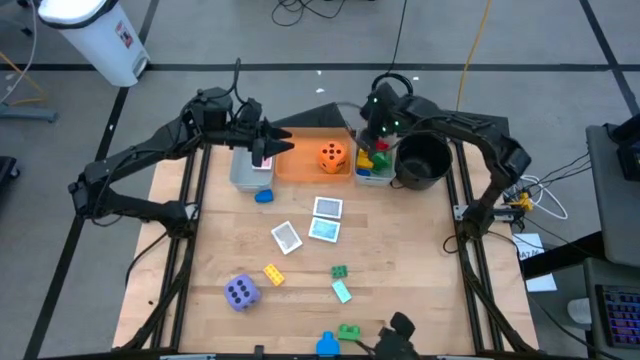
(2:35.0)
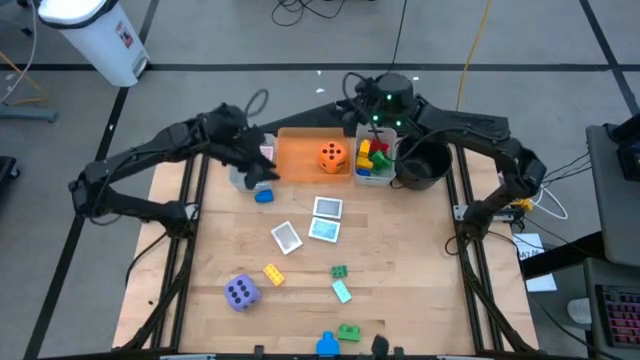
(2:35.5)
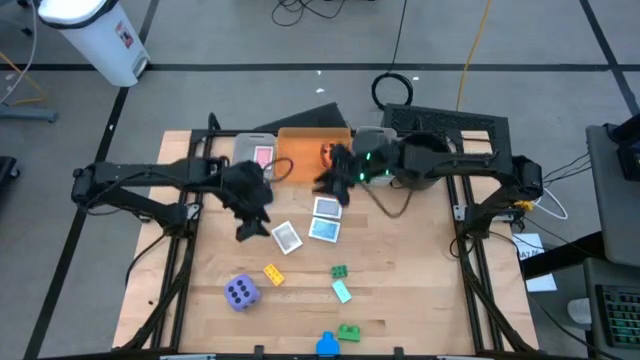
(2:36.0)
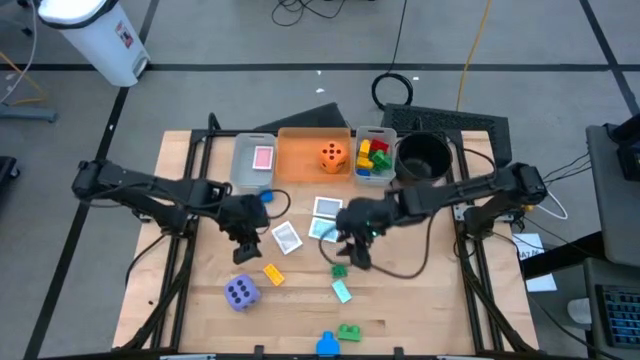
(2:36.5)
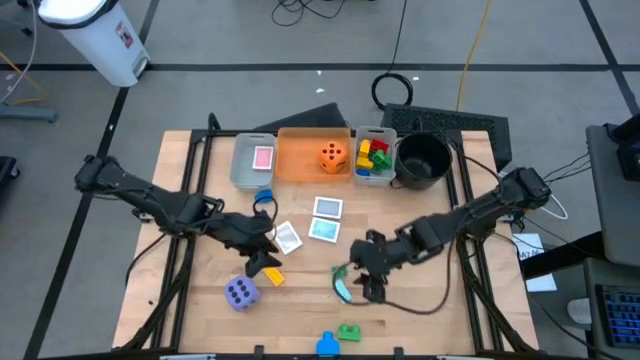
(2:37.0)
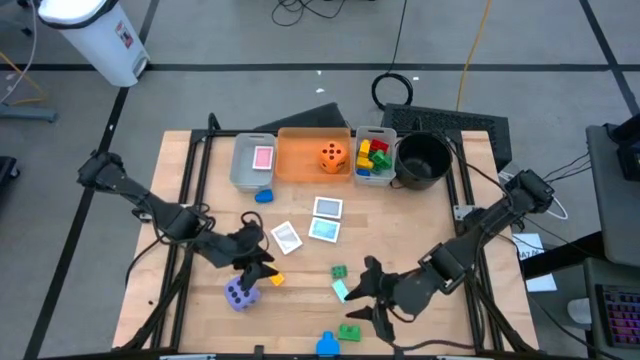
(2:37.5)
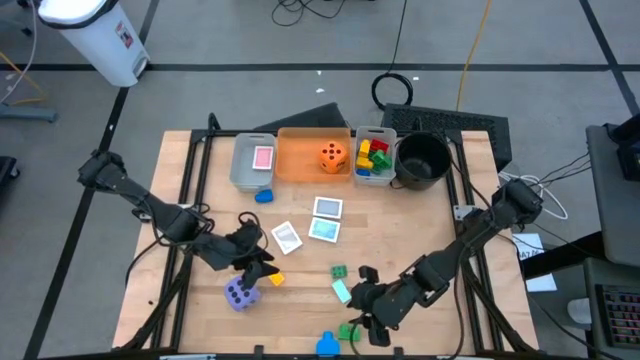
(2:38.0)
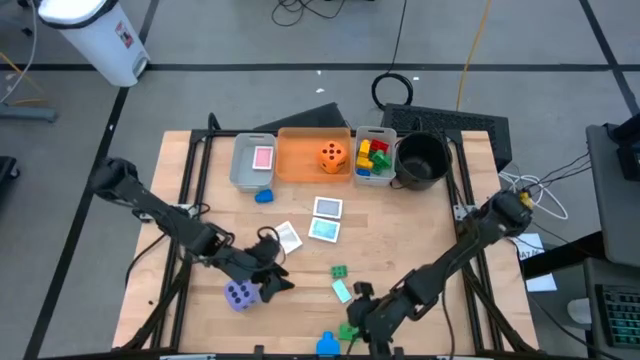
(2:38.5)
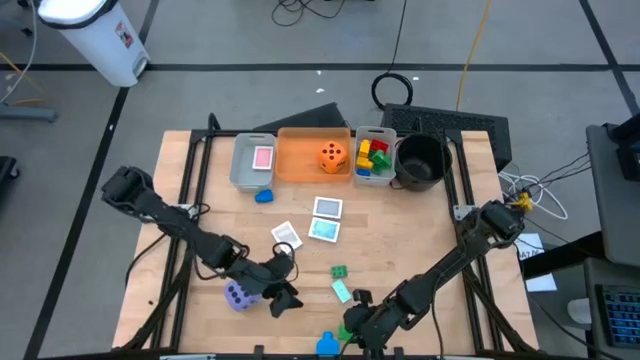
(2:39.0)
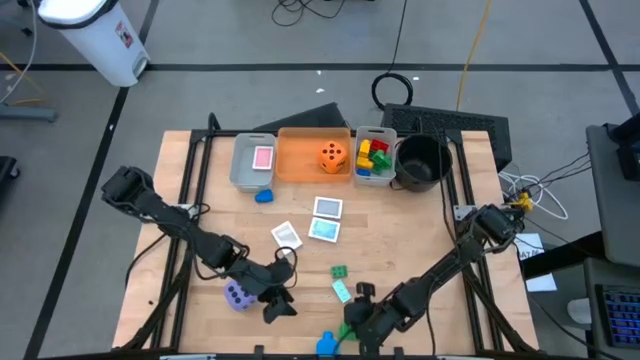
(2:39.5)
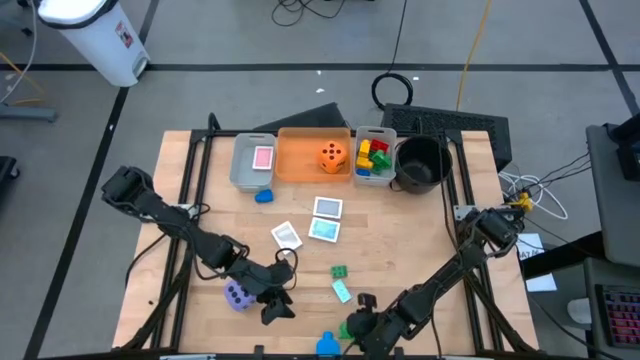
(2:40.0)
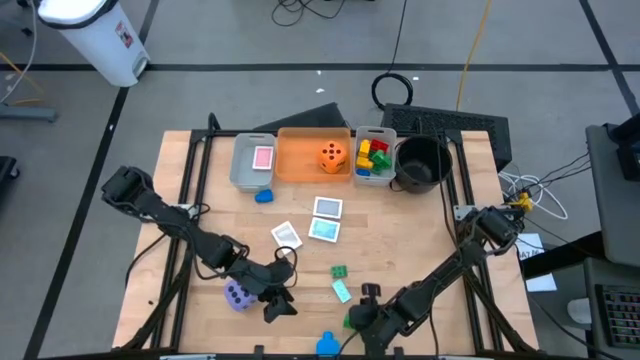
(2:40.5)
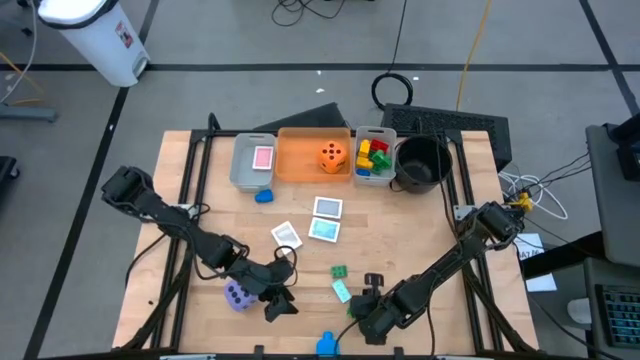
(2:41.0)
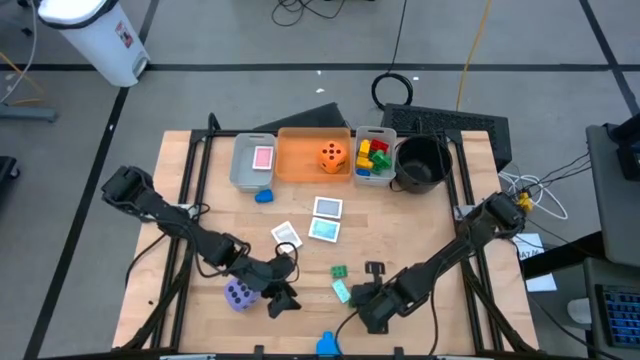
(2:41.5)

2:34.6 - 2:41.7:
Task: Pick & Place Toys
Put the green game piece into the right gray bin

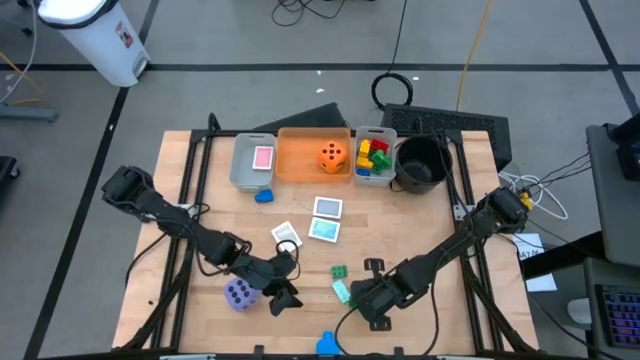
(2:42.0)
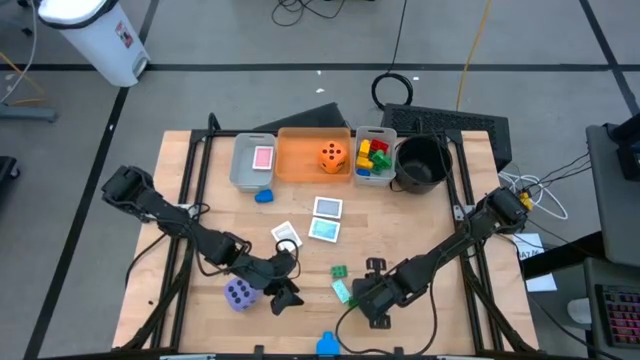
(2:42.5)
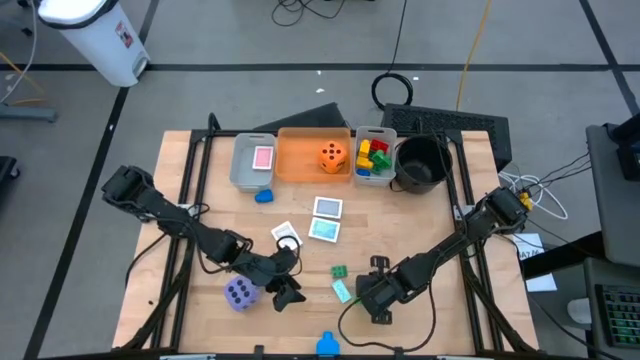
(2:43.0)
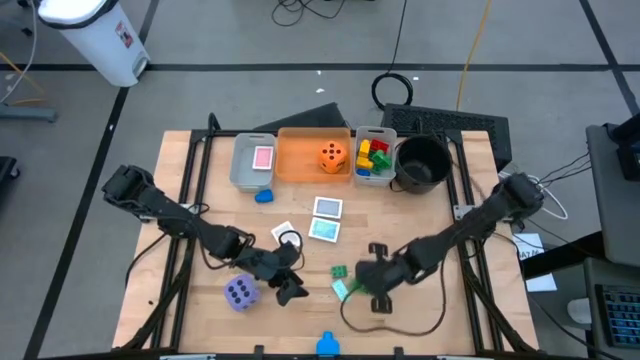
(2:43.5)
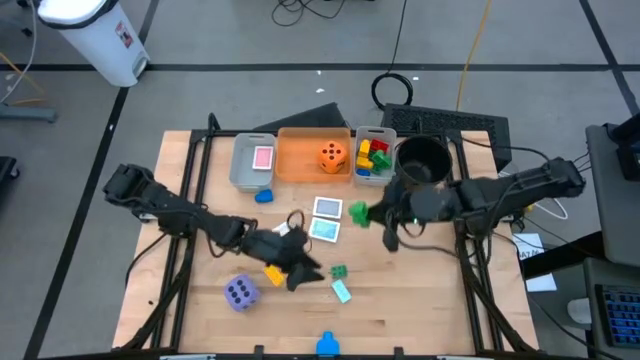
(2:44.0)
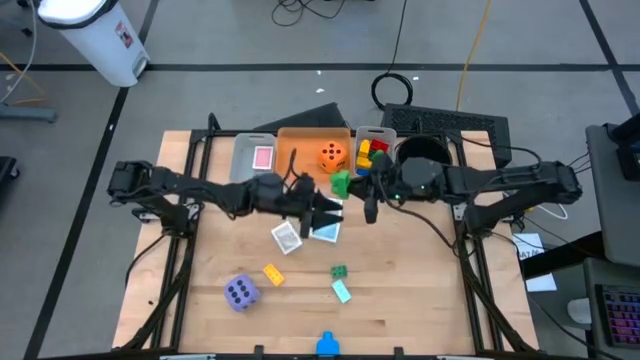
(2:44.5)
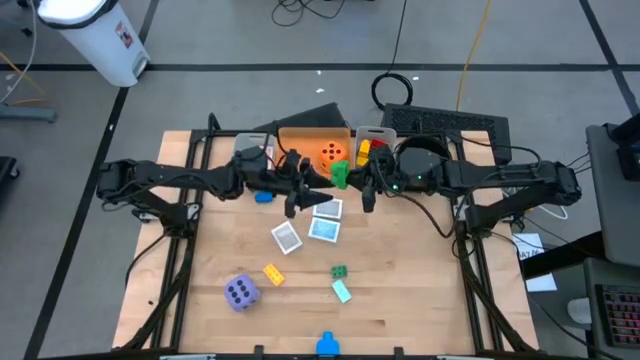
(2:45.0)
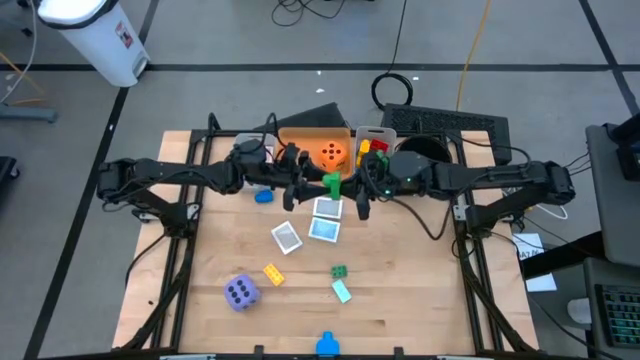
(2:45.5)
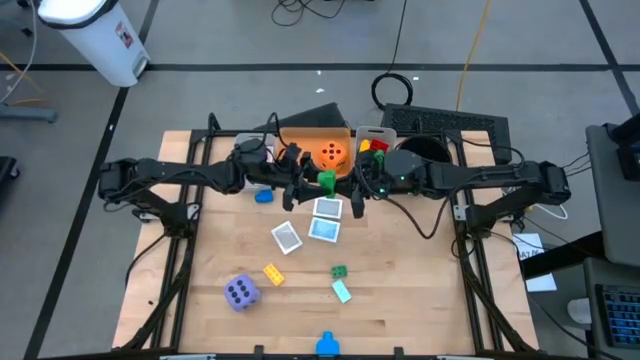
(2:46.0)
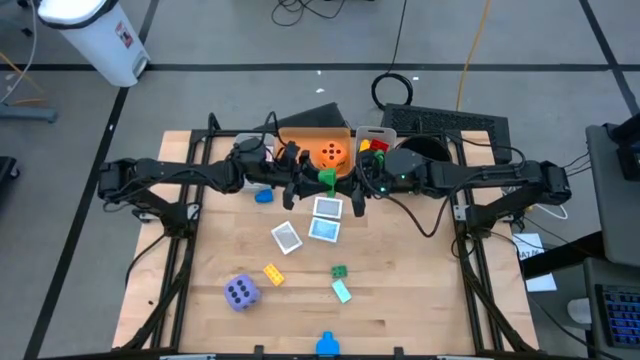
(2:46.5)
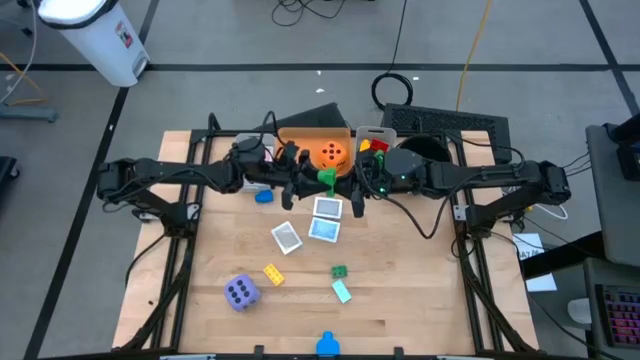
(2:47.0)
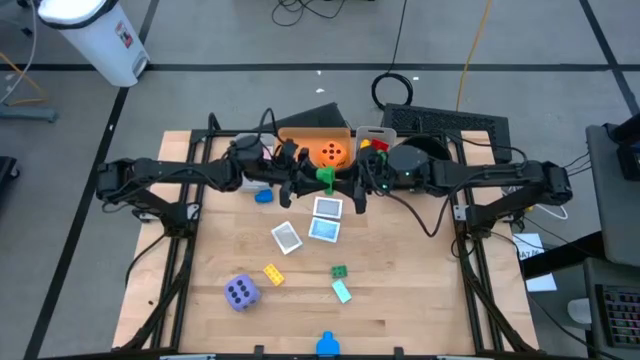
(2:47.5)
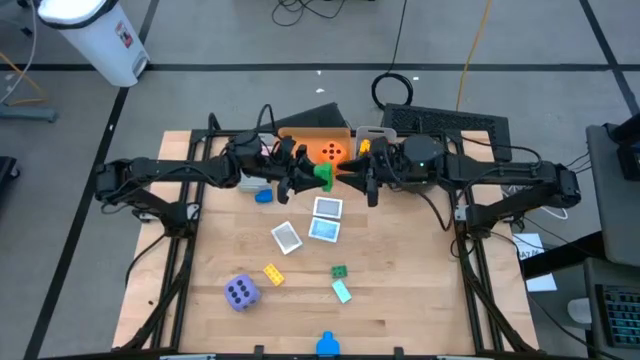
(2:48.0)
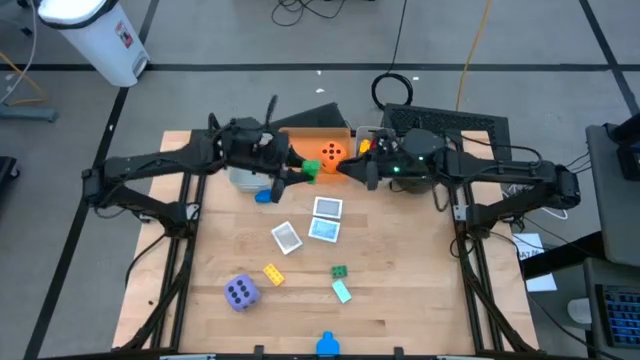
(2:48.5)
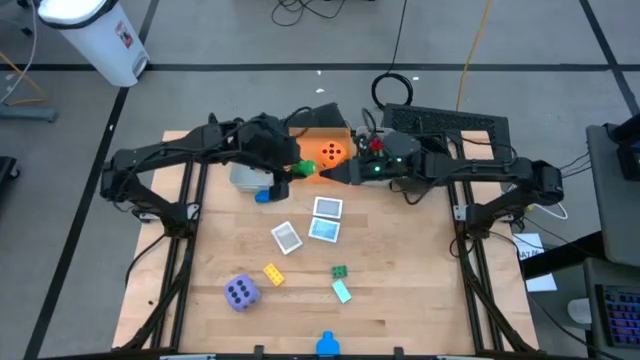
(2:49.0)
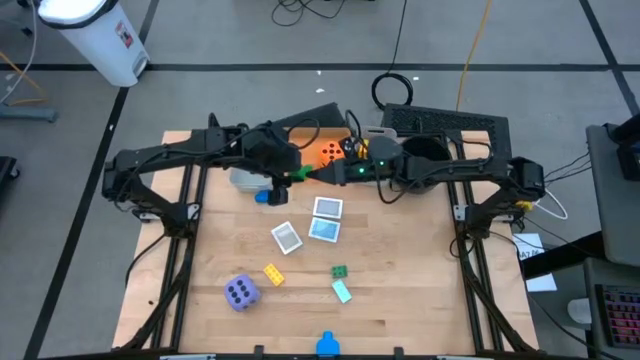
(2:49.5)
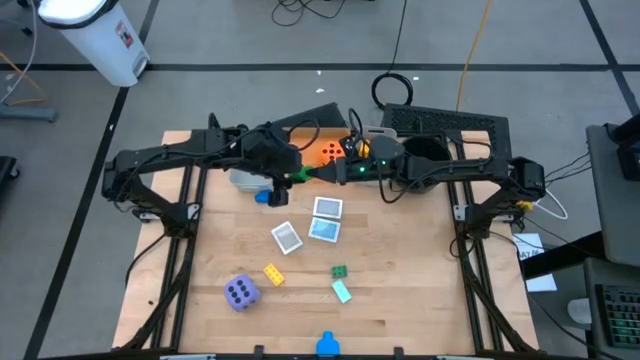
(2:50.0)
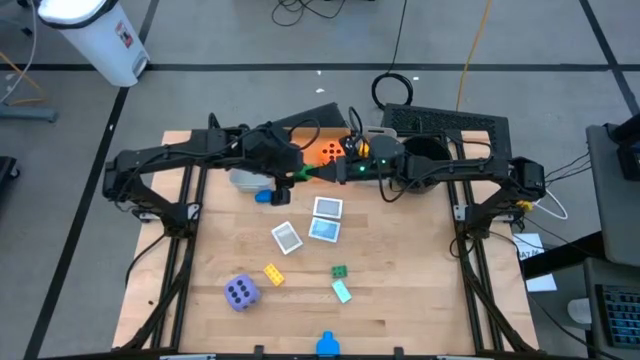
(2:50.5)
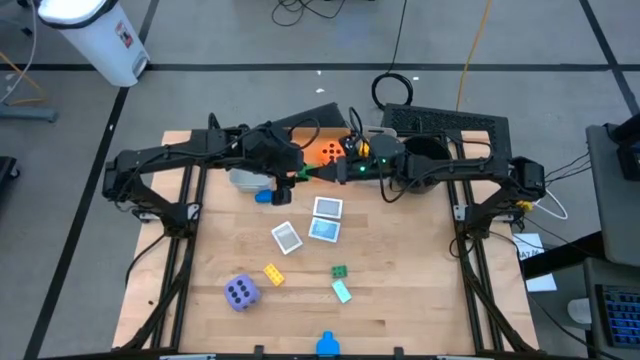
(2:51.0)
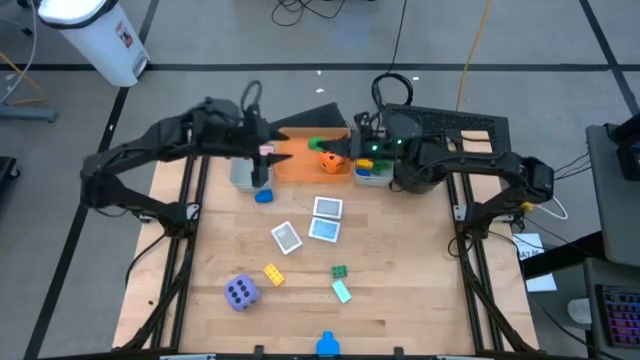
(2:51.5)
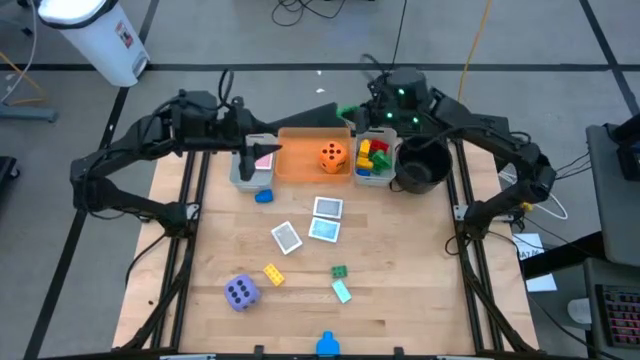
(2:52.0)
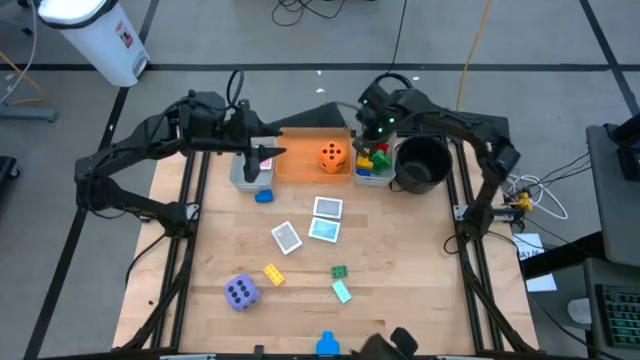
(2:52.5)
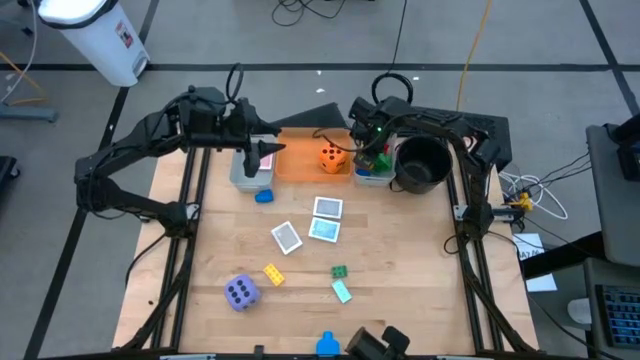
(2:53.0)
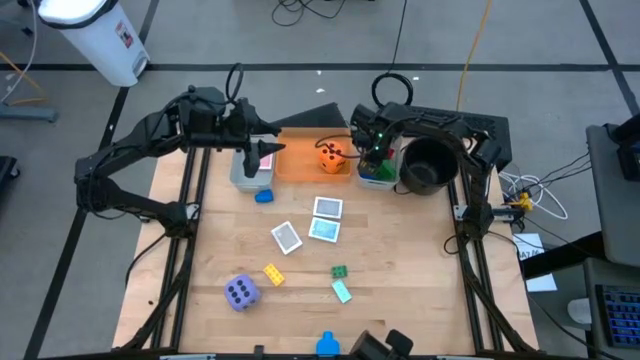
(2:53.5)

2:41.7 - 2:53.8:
Put the green game piece into the right gray bin

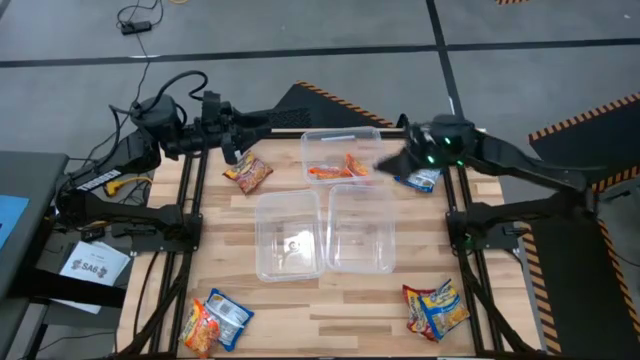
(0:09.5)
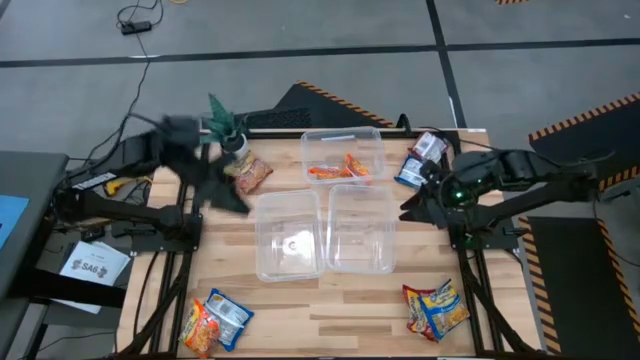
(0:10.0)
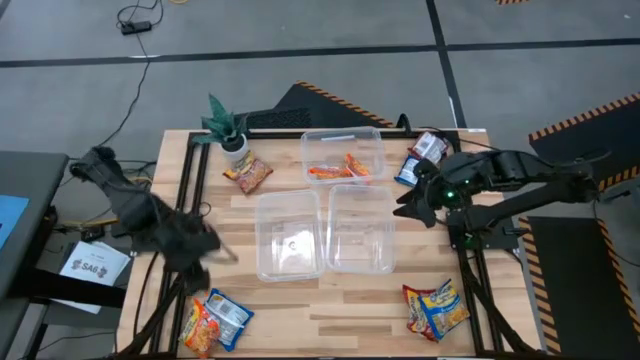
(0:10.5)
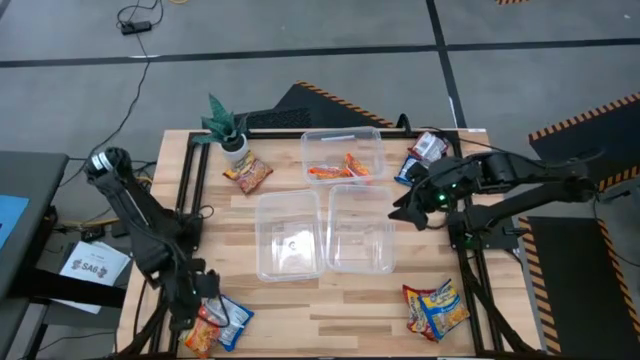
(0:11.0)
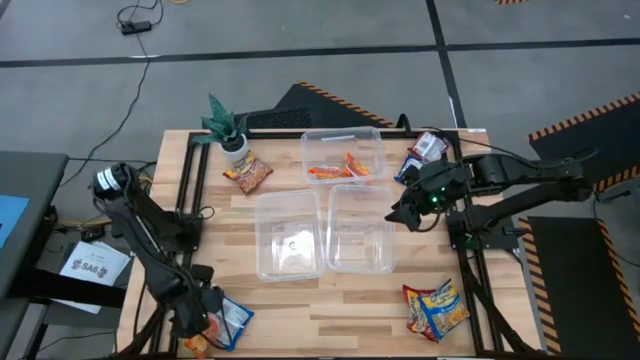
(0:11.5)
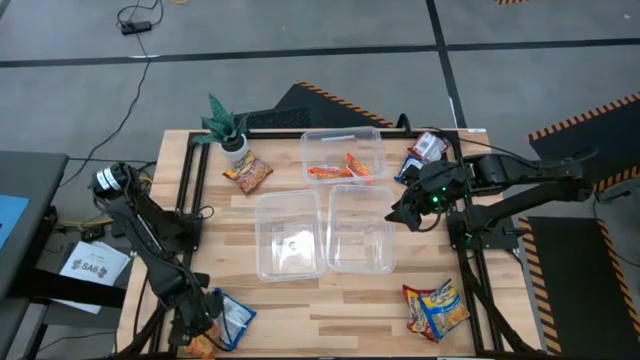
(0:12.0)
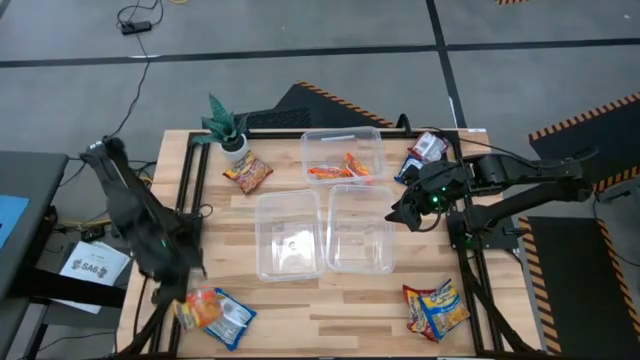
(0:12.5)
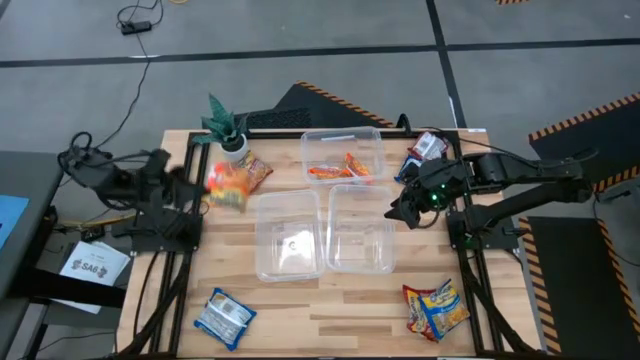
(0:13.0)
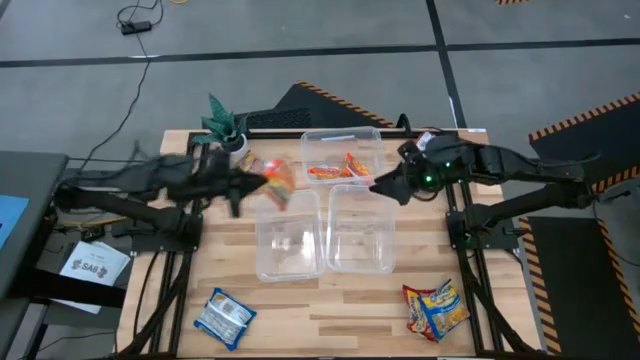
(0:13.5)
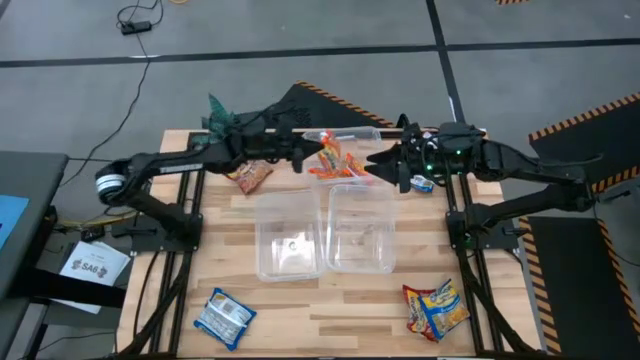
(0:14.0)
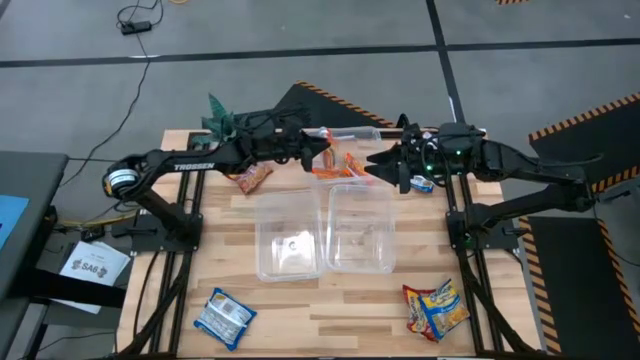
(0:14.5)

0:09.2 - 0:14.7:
Task: Sort Maruchan noodles
Put the orange noodle pack into the top transparent bin
